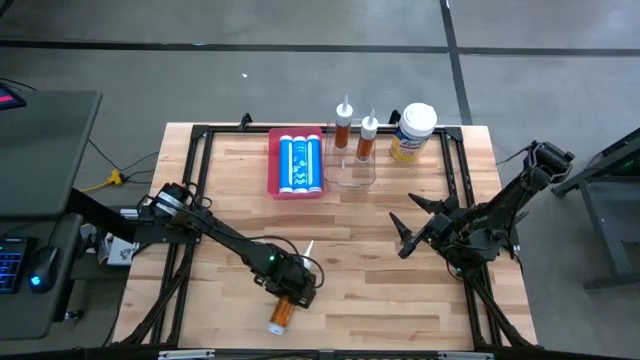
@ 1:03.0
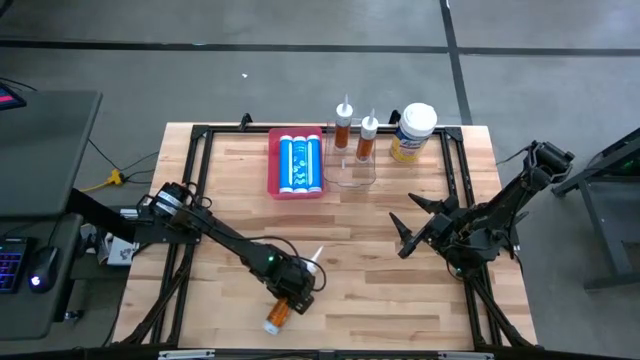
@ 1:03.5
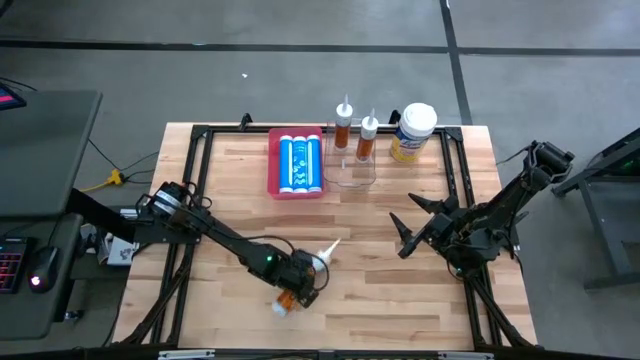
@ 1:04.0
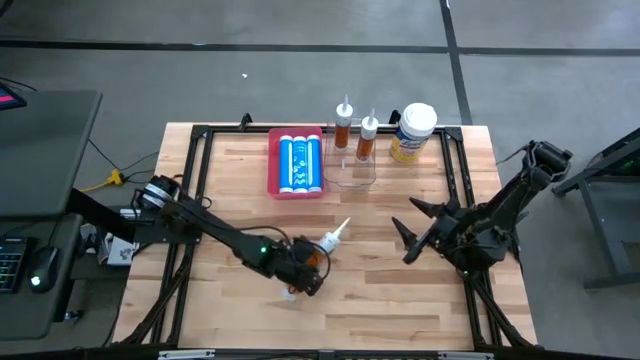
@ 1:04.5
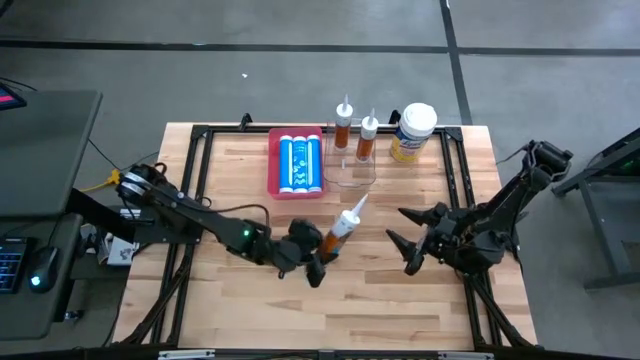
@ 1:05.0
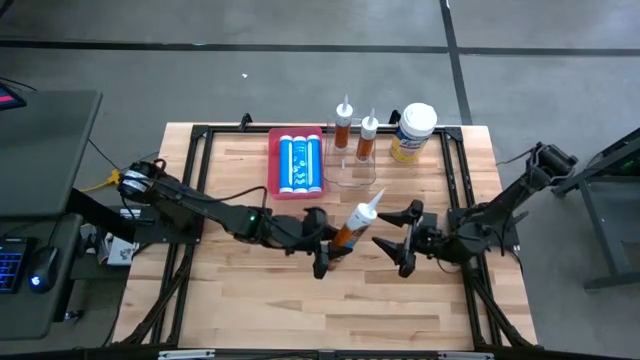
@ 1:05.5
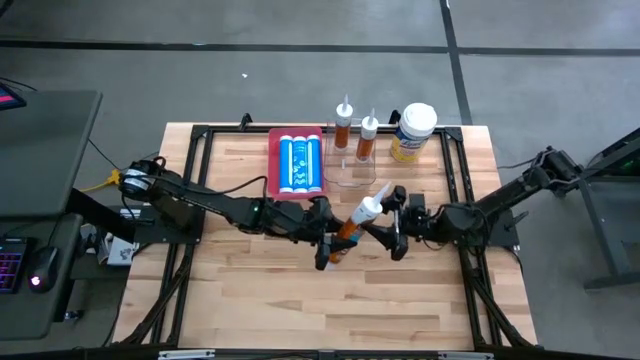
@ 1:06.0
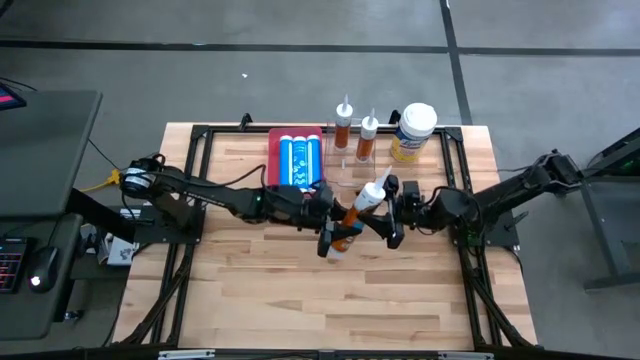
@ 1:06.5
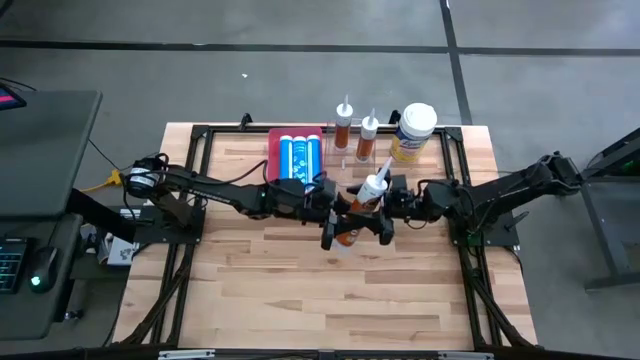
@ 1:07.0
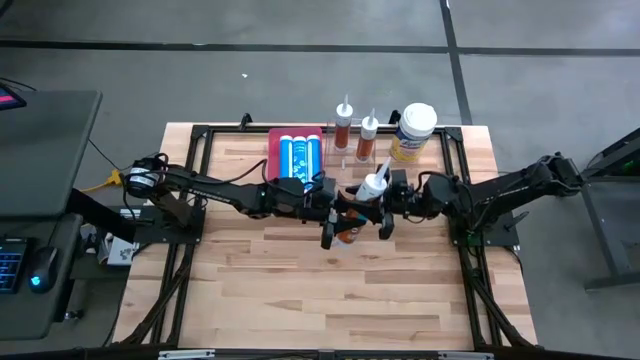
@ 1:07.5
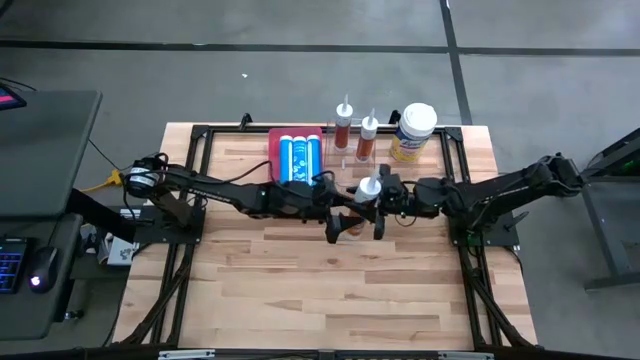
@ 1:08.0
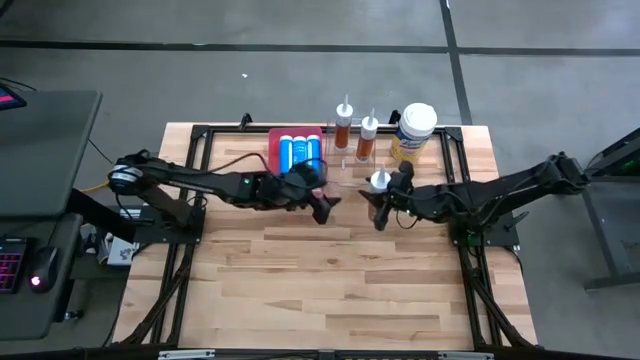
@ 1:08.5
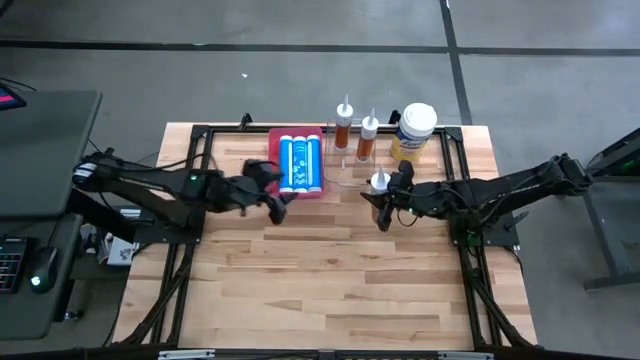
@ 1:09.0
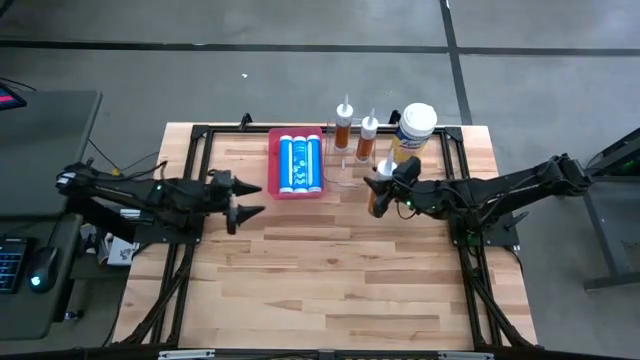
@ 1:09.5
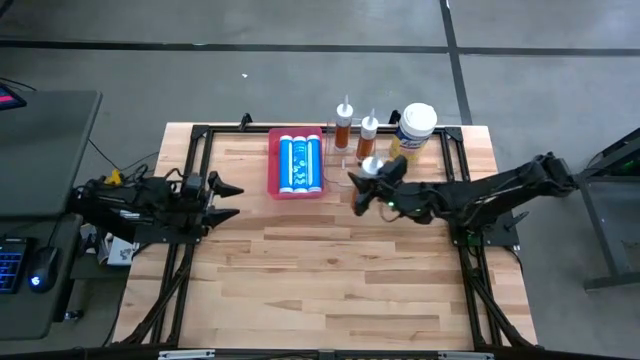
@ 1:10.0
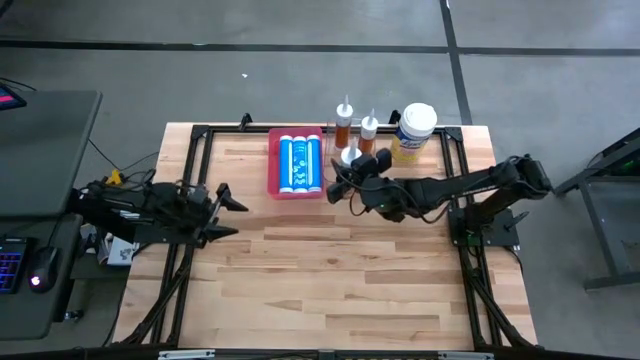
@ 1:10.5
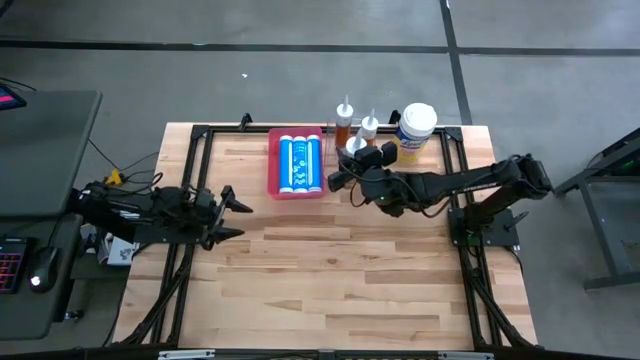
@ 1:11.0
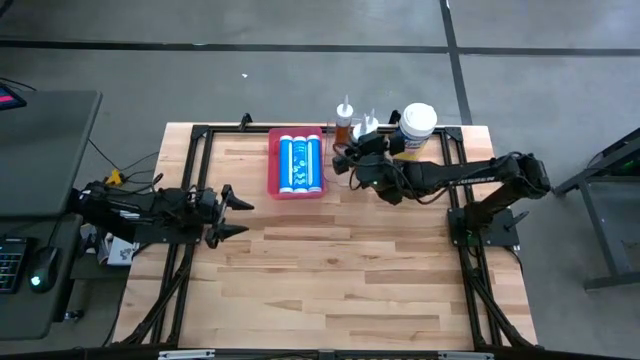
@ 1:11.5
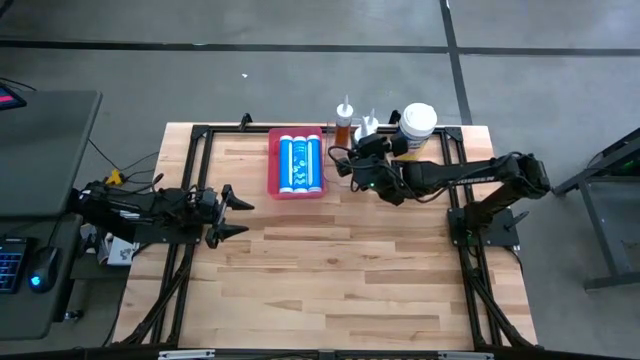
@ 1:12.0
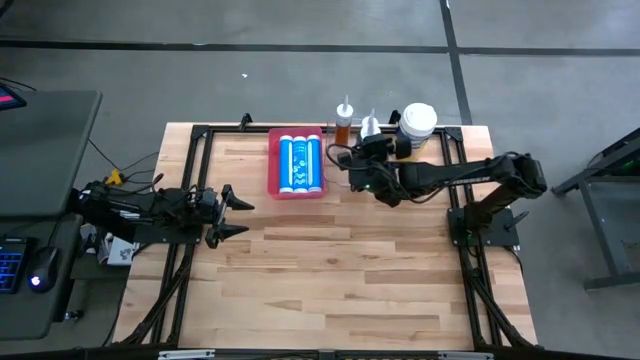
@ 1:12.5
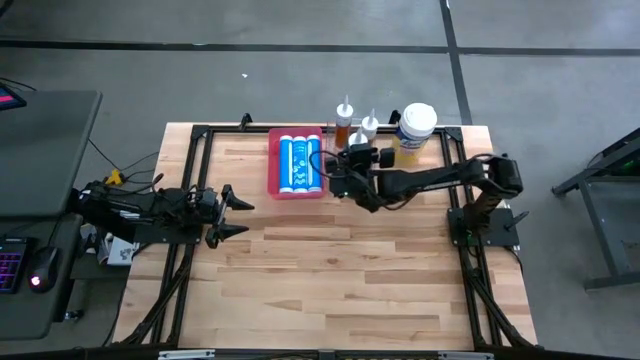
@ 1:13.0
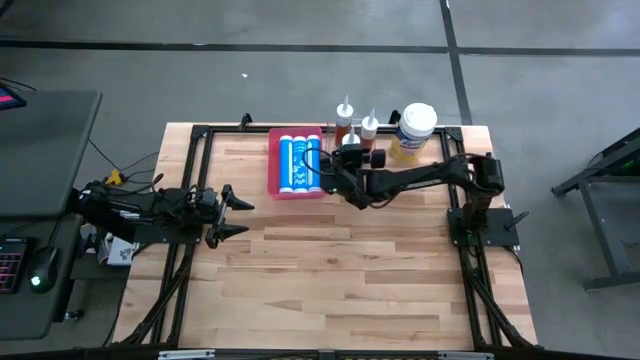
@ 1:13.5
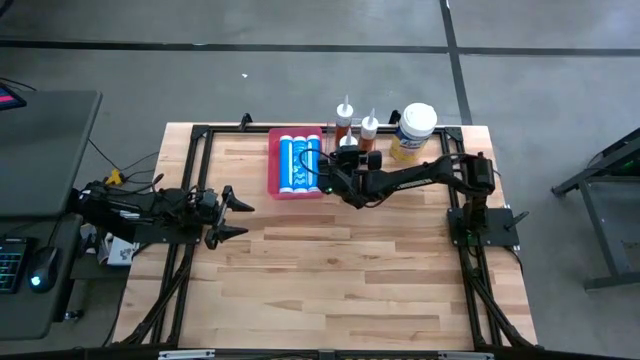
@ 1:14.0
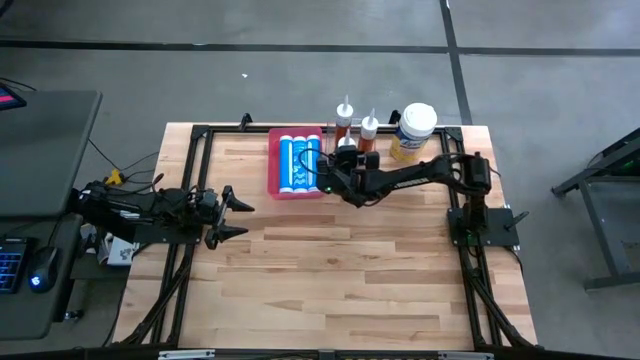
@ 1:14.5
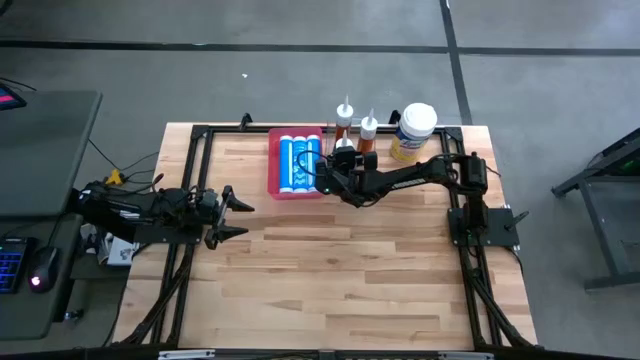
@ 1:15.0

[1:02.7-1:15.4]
Task: Pick & place silicon tubes, Sealant and Lysol wipes
Put the orange sealant into the transparent bin

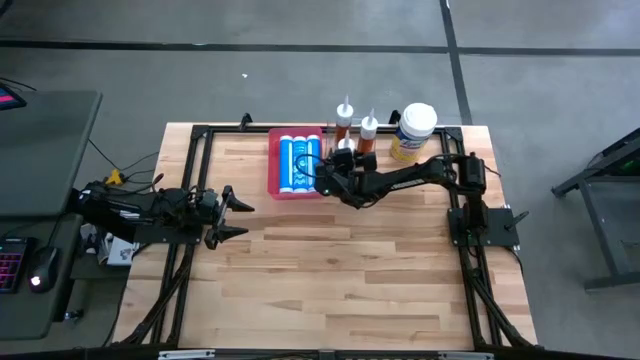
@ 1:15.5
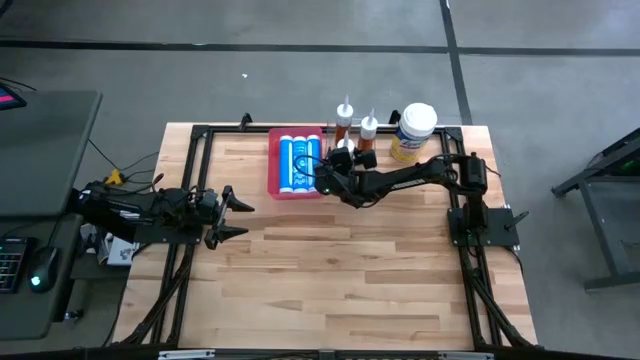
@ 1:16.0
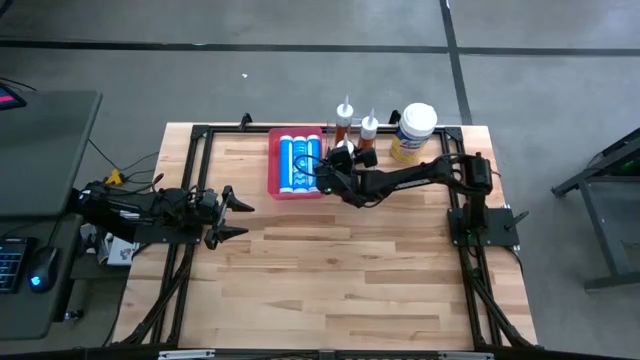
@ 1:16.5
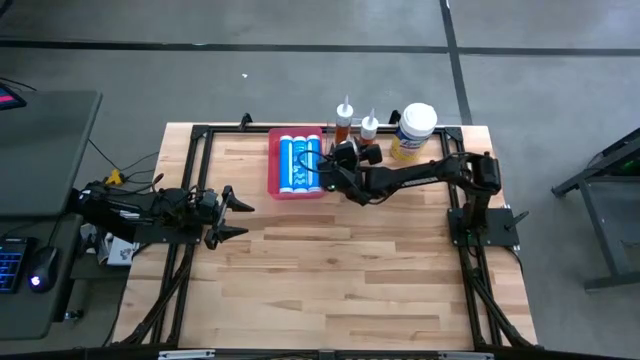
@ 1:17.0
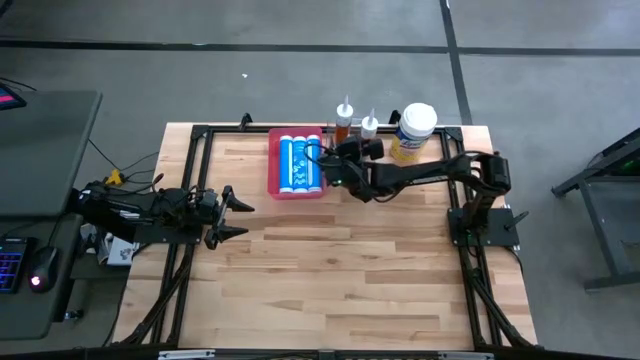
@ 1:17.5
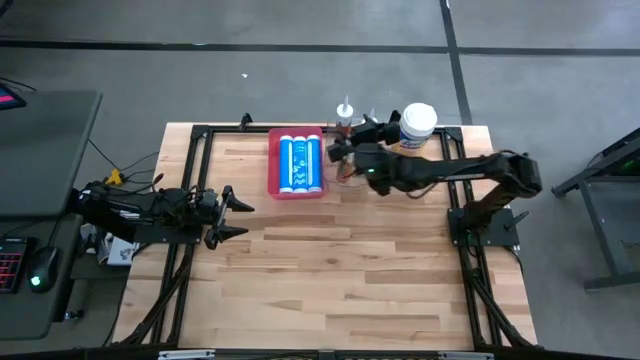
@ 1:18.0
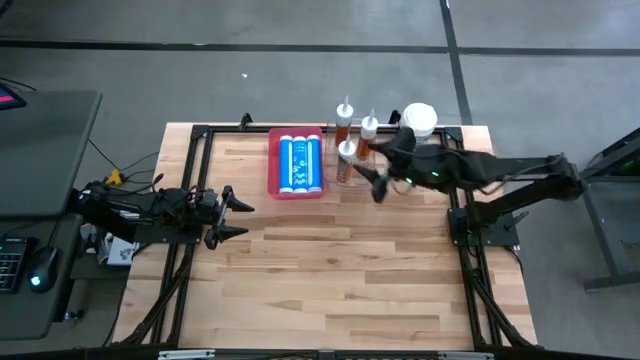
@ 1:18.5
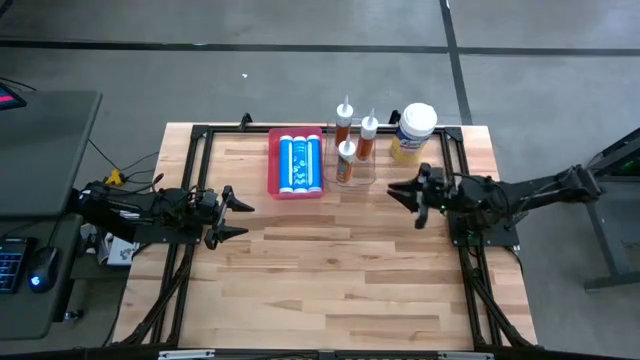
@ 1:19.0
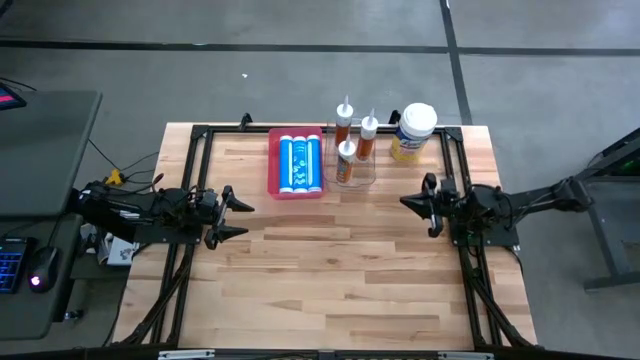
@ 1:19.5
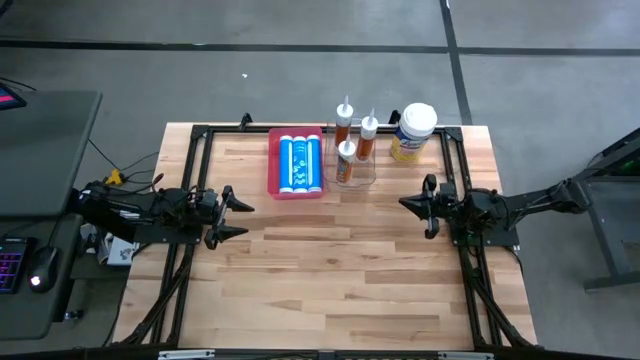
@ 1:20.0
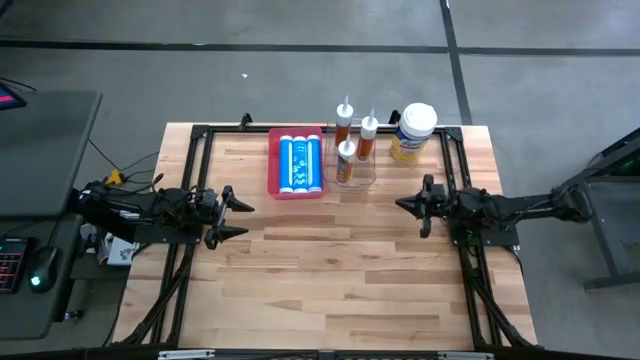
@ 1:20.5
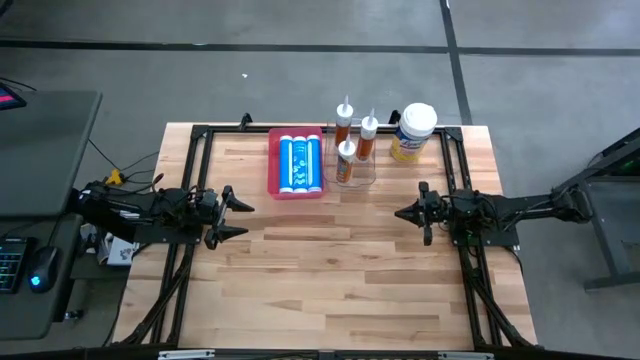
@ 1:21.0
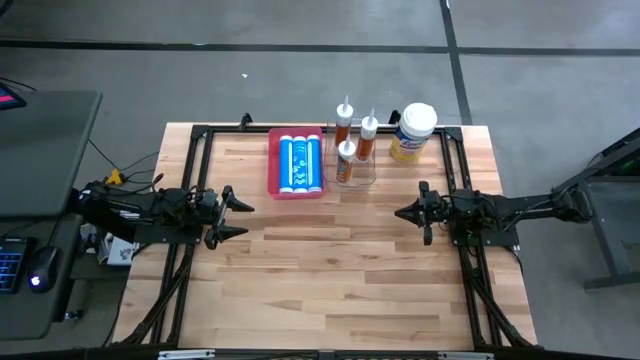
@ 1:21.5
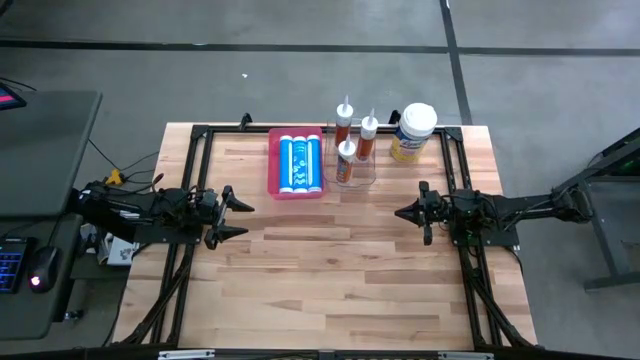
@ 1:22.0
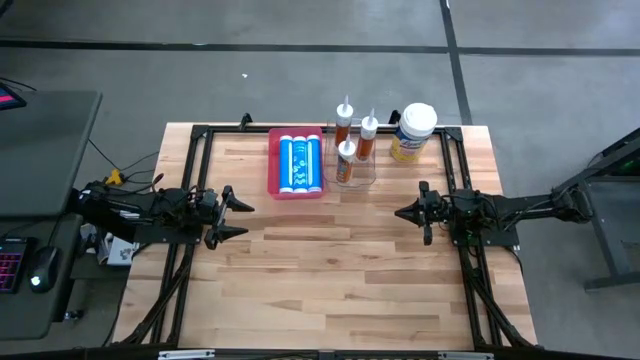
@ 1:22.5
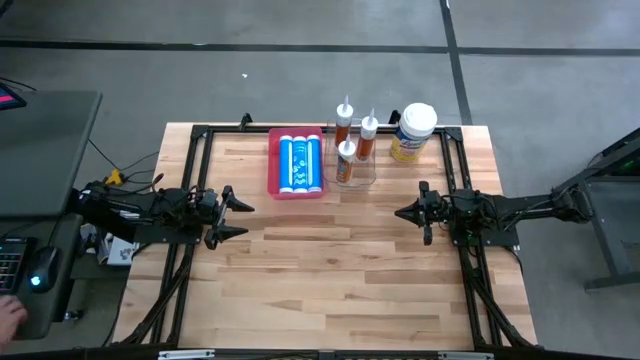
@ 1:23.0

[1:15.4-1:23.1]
Return to Home Position

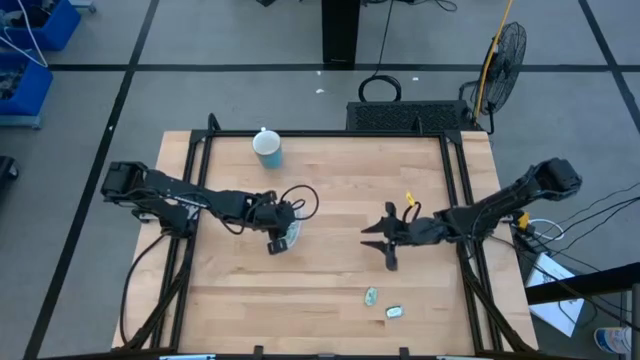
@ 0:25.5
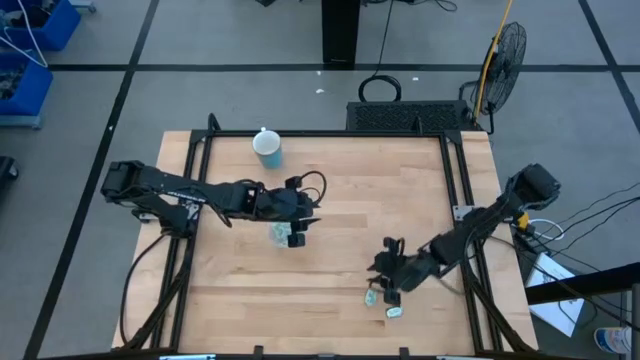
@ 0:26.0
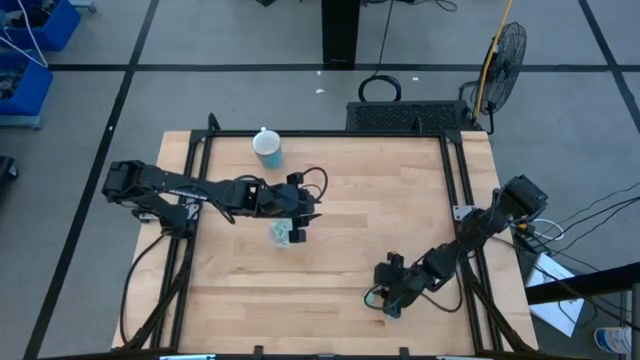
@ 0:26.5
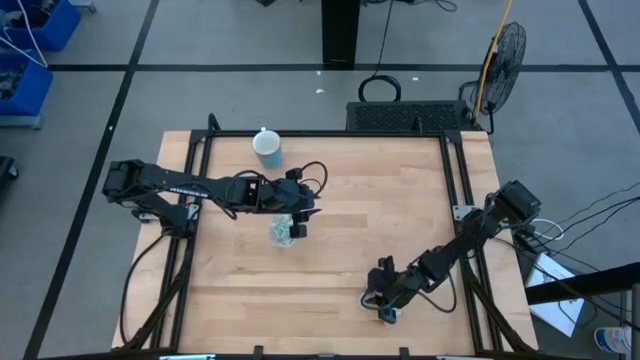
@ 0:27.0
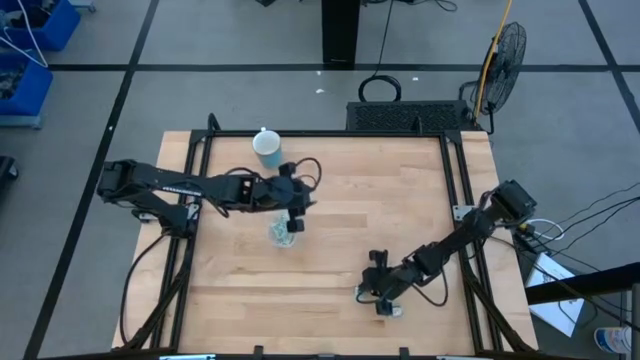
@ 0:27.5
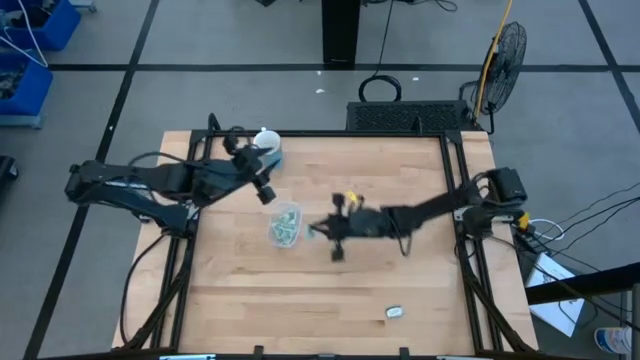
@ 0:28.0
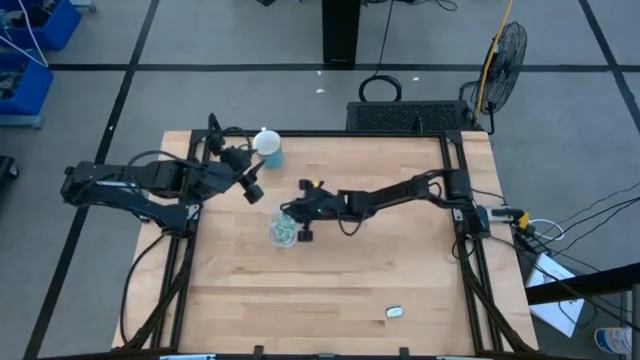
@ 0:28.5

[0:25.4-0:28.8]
Task: Pick and place Stevia / Truvia into bins
Put the light green stevia packet into the transparent container
